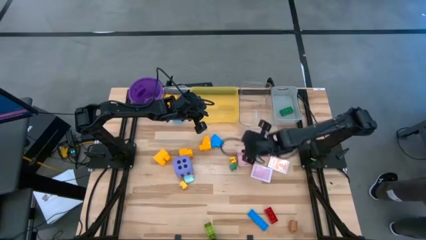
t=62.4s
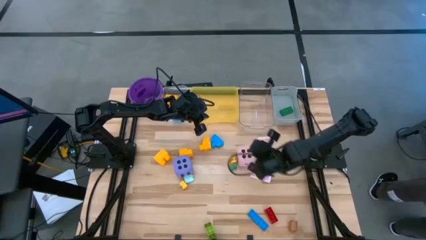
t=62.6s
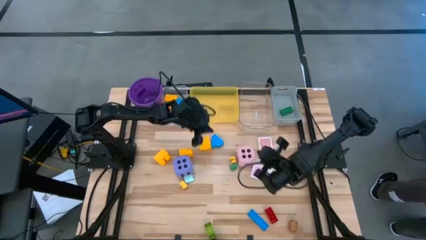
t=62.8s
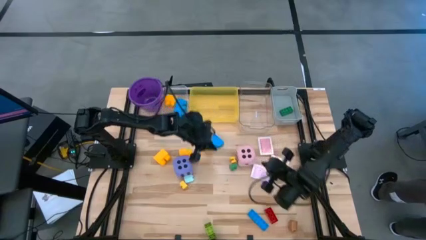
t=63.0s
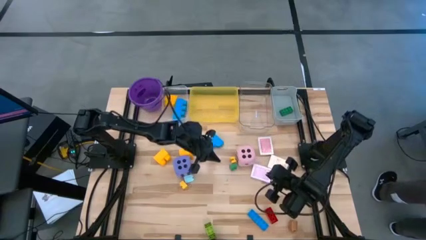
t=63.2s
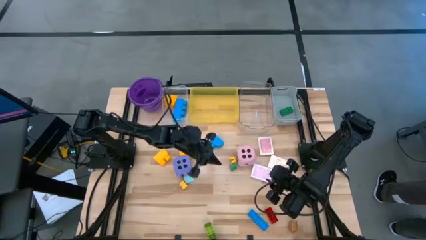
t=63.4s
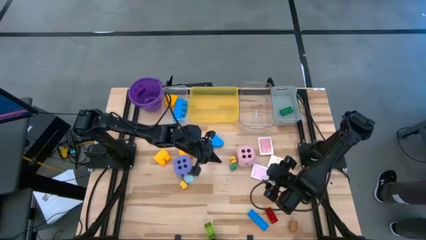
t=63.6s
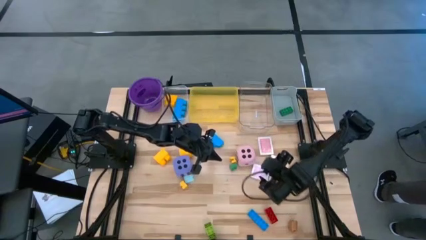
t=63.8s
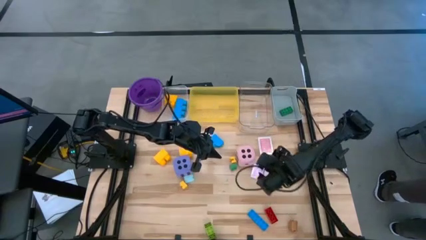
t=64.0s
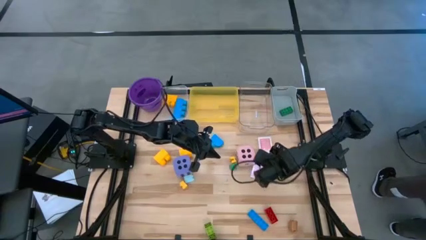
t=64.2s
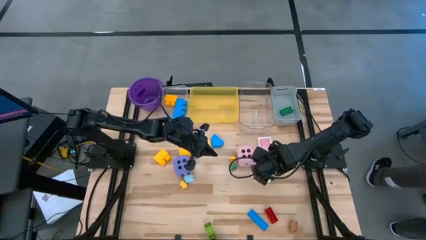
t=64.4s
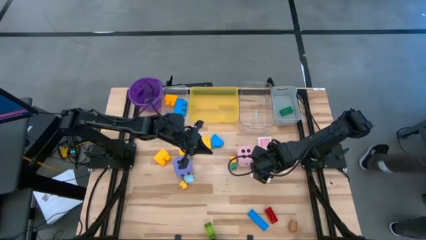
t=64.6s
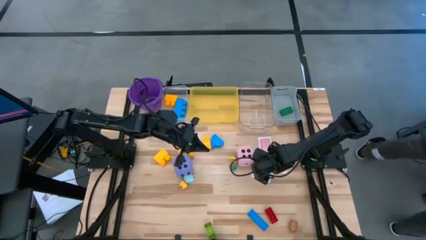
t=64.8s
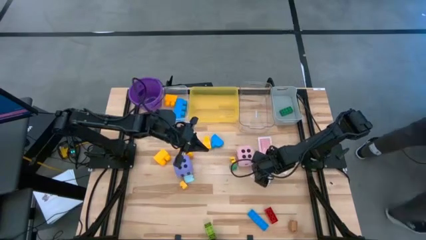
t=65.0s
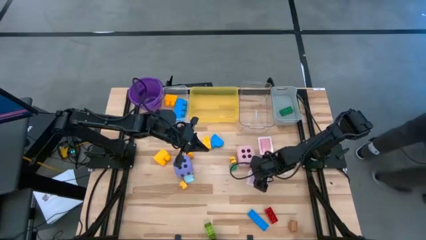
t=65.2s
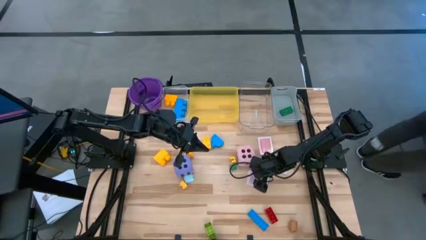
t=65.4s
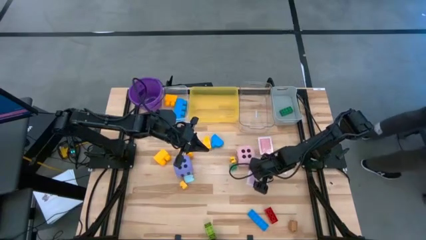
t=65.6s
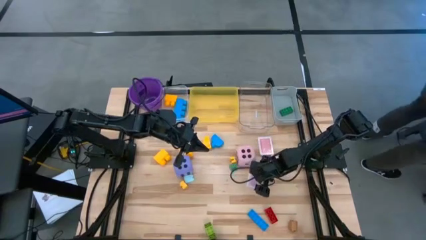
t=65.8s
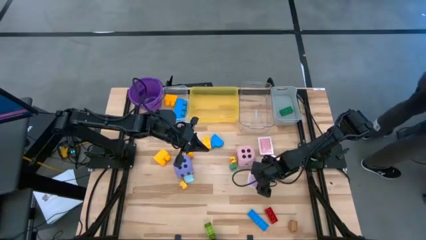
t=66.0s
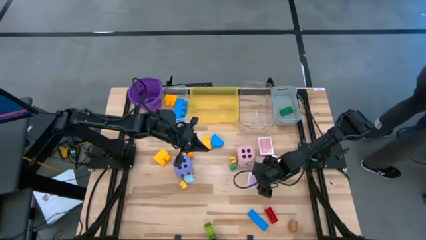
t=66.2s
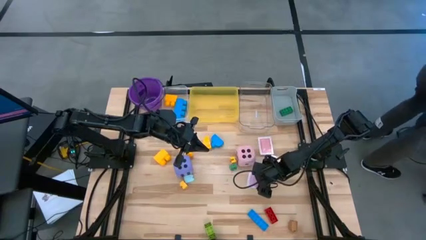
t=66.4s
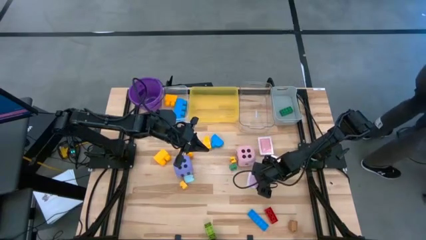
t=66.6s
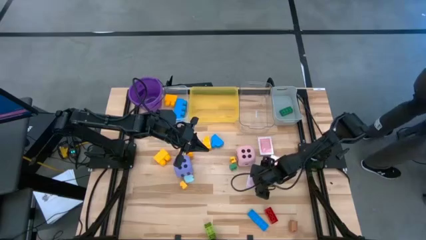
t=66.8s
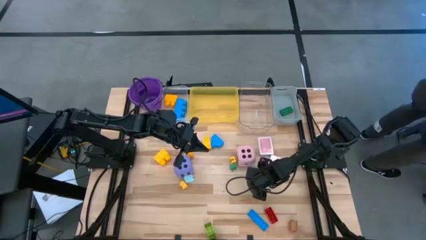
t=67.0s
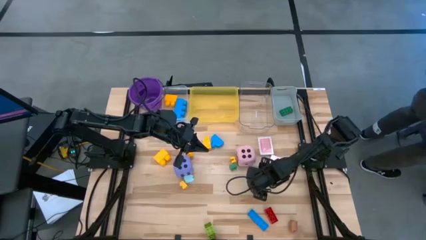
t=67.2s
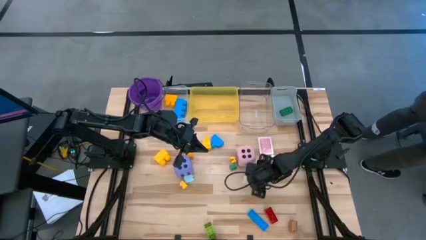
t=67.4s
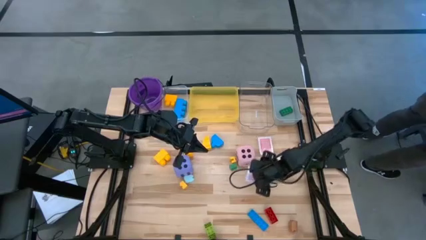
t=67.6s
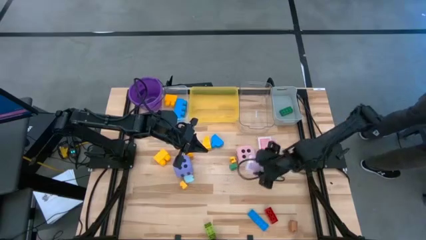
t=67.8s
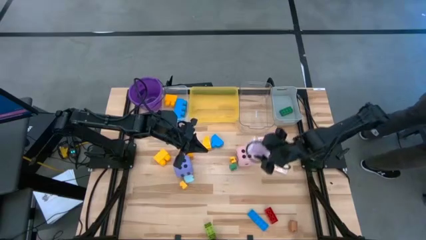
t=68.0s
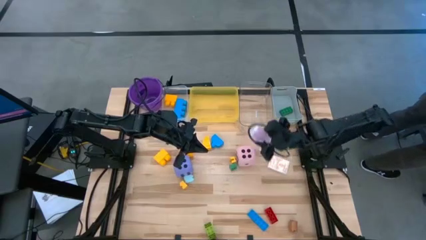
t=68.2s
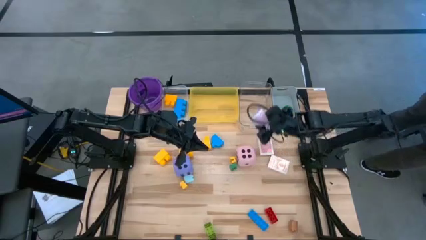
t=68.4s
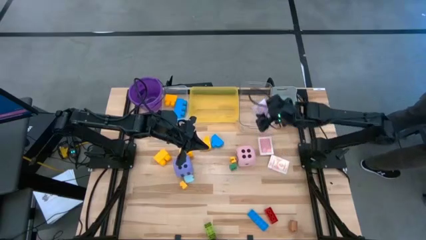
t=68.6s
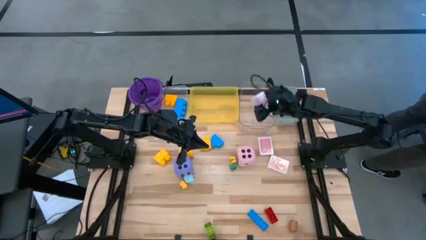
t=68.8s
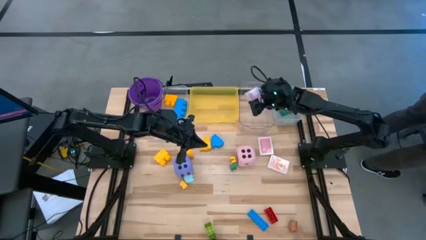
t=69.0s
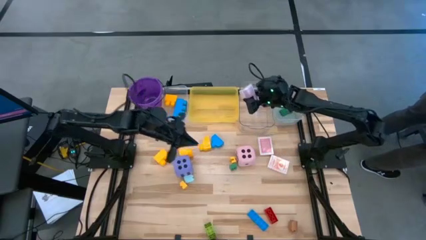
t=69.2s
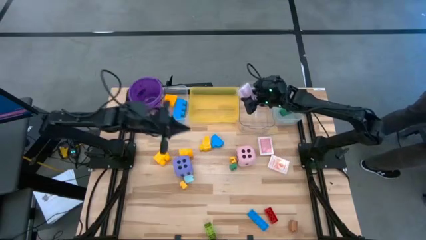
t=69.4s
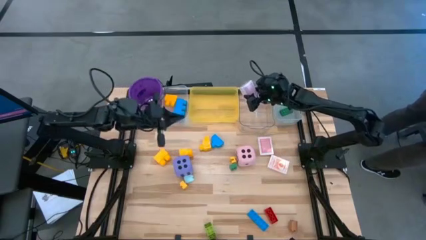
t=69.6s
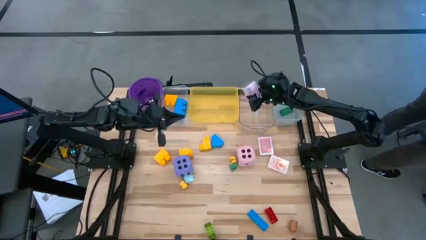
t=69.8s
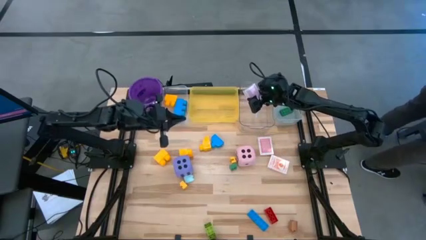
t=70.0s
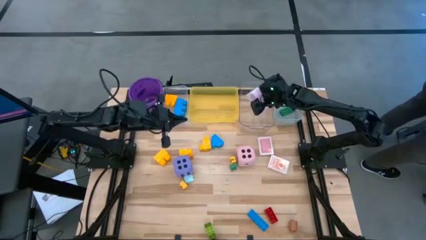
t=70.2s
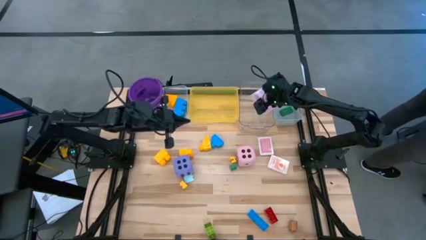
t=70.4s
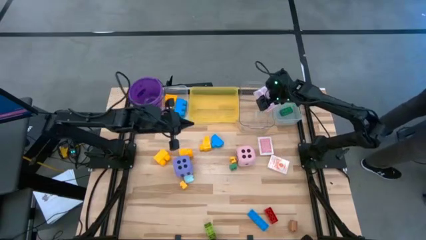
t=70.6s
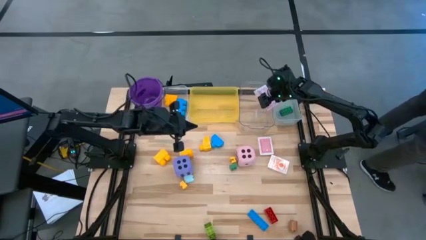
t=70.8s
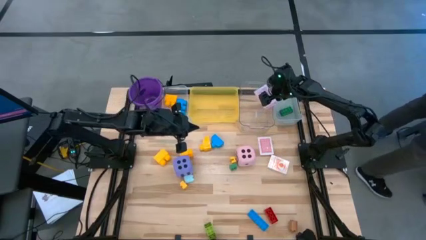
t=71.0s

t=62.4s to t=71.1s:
Task: Pick & Place Toys
Put the bottom pink deck of cards into the transparent bin

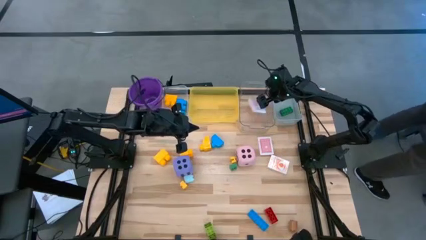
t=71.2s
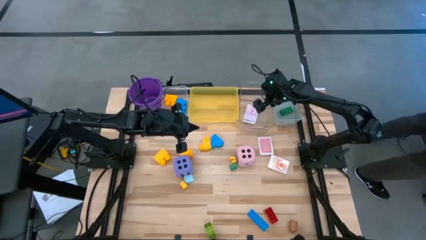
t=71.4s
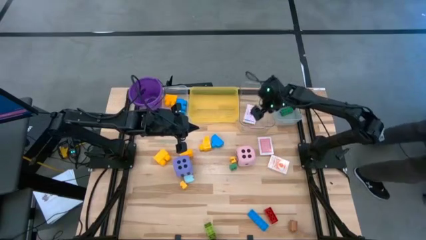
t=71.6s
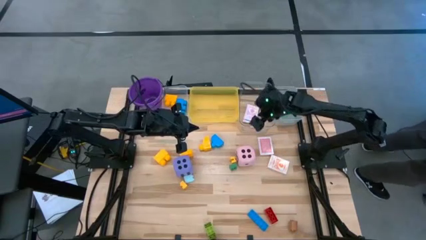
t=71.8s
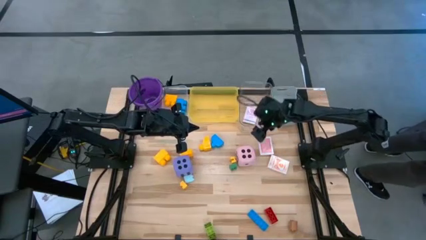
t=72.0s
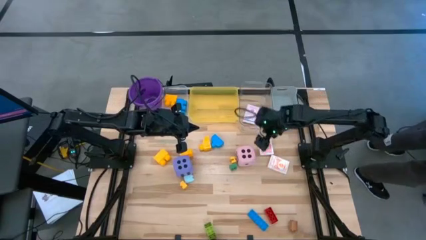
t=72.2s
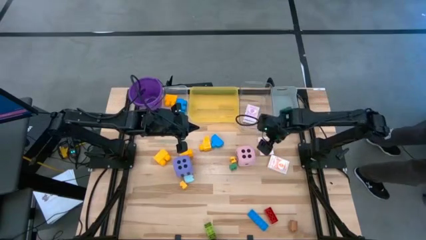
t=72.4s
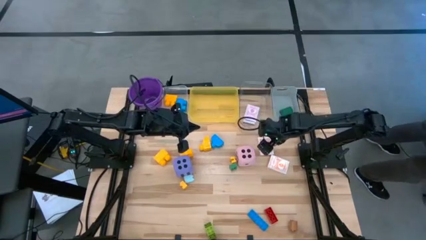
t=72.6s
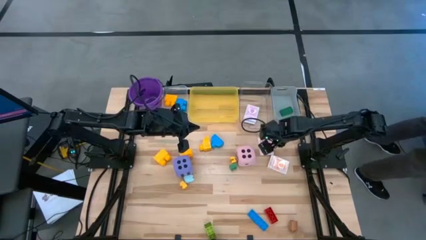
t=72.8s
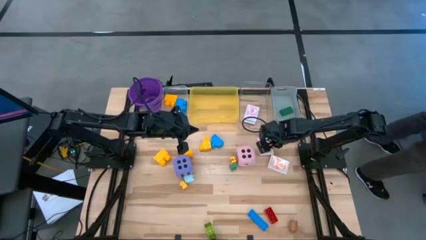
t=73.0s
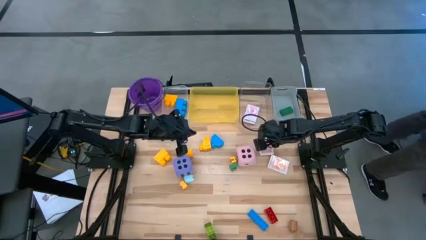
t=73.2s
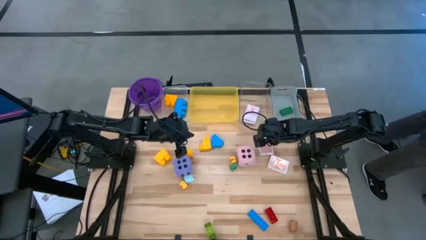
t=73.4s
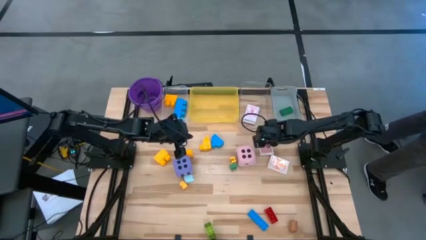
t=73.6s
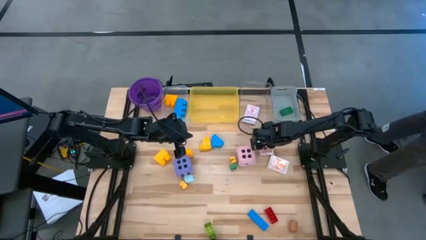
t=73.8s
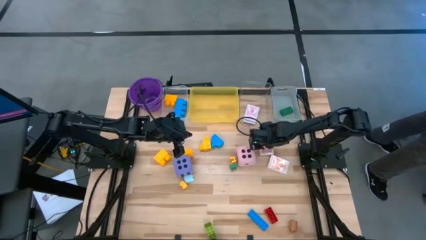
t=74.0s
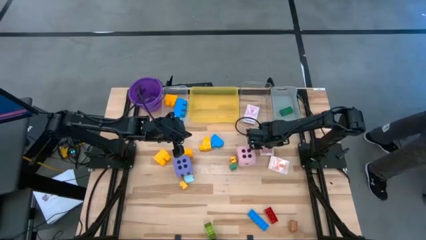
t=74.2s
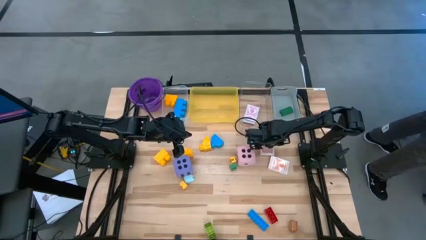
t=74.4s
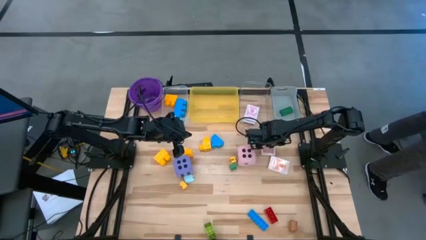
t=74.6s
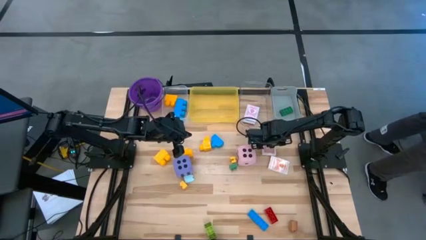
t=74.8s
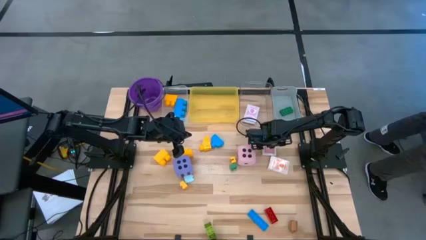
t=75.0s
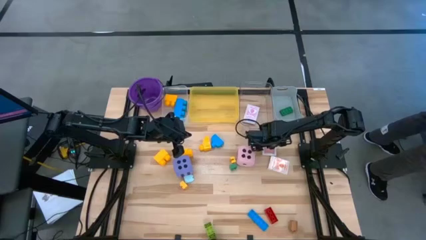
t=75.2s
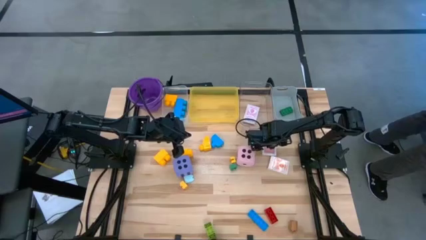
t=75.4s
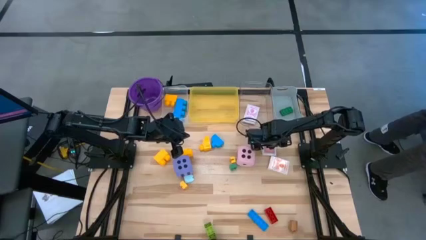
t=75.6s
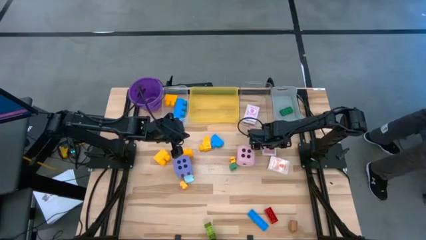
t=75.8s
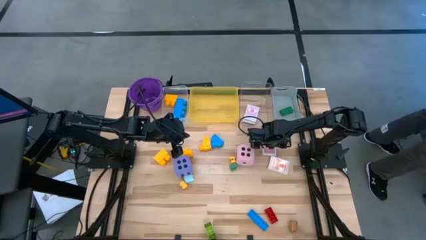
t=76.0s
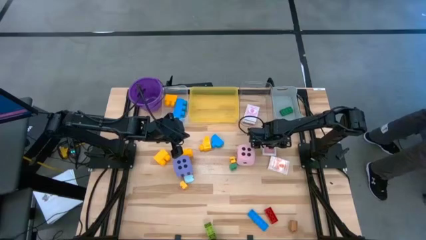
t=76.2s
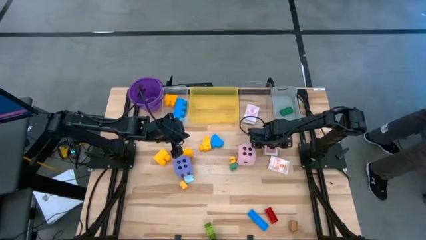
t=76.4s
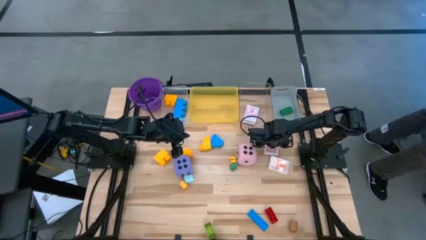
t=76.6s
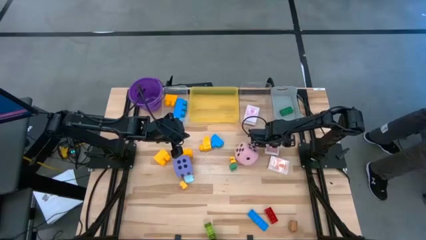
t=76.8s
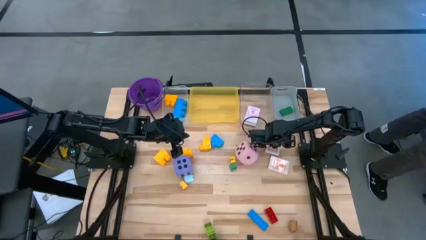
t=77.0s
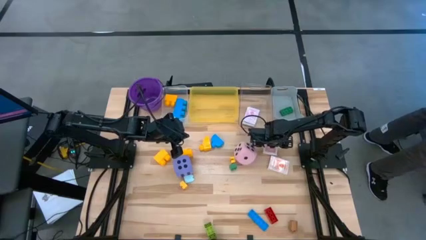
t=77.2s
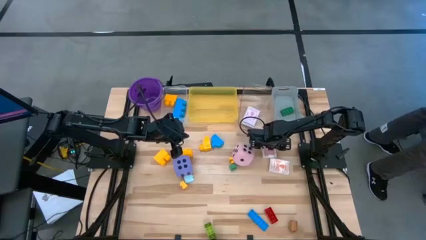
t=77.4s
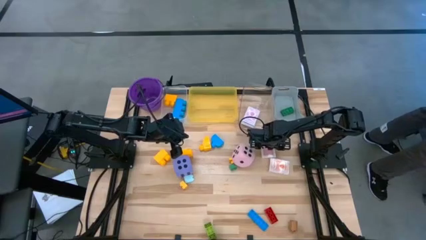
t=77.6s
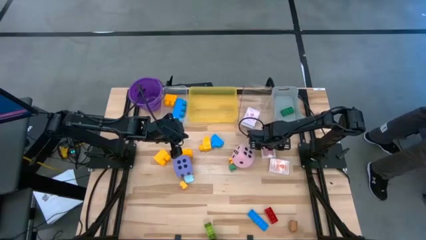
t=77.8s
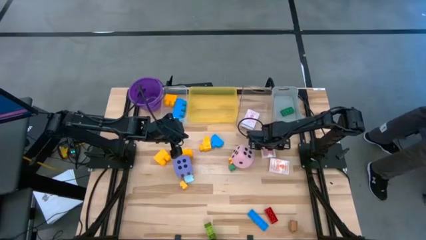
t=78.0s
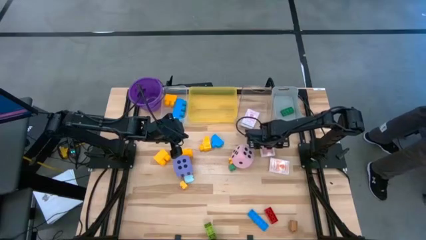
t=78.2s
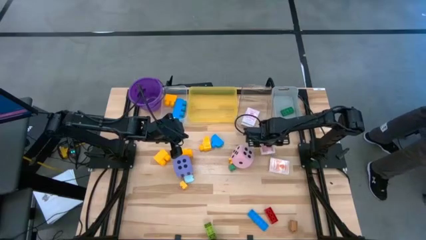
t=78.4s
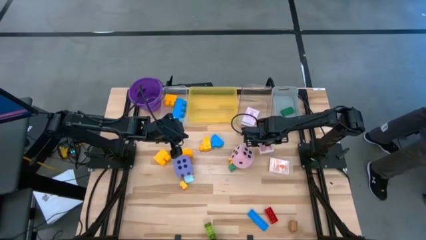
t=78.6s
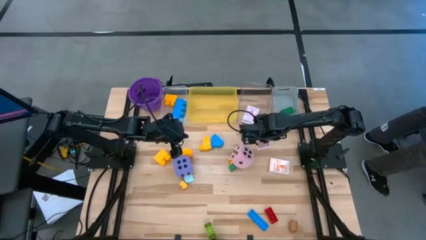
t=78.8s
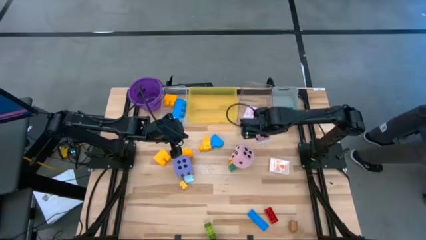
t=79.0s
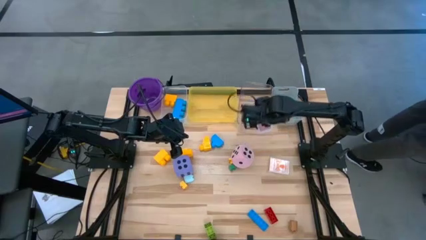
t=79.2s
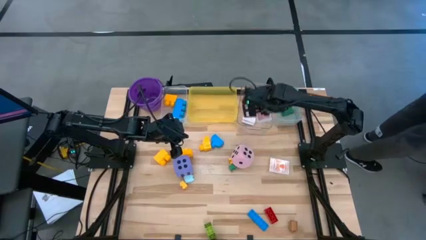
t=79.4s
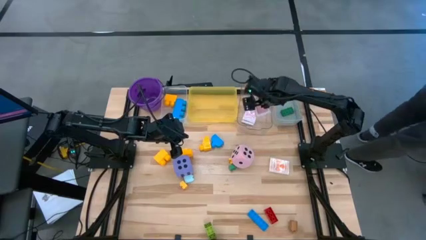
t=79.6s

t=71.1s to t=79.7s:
Put the red deck of cards into the transparent bin
